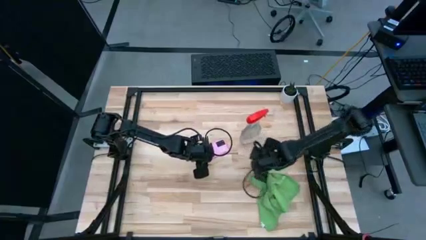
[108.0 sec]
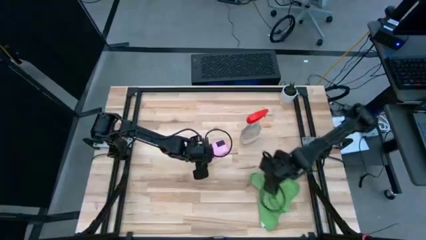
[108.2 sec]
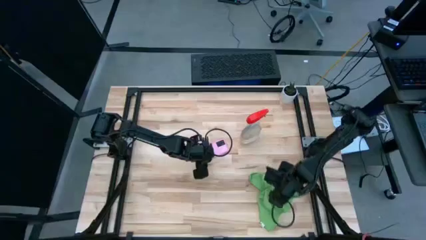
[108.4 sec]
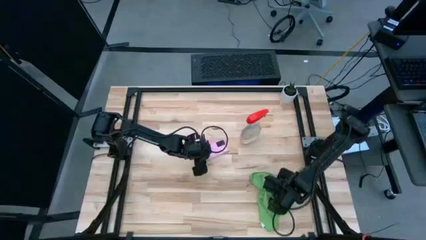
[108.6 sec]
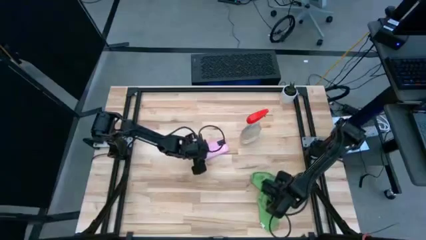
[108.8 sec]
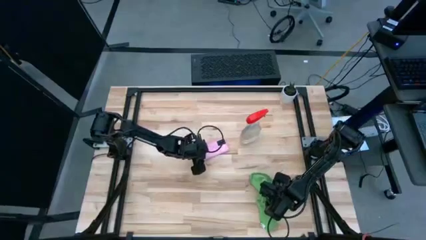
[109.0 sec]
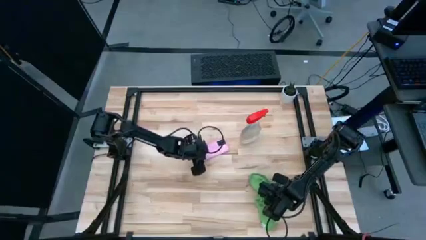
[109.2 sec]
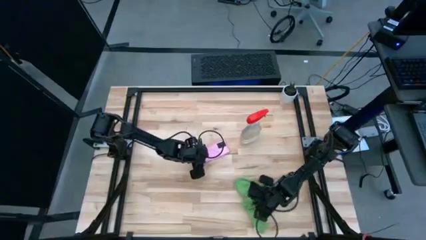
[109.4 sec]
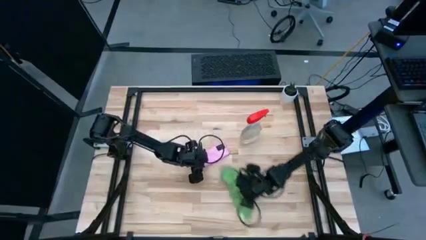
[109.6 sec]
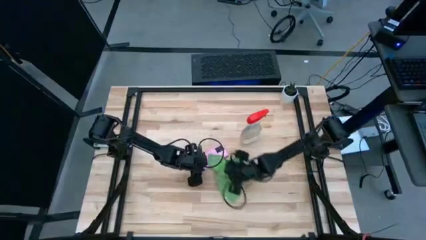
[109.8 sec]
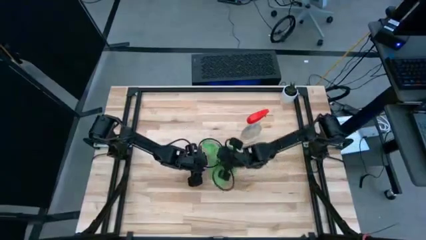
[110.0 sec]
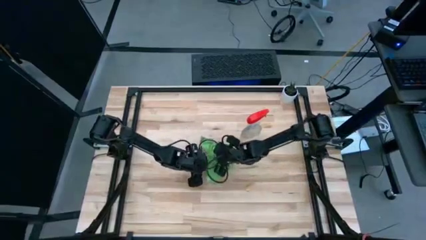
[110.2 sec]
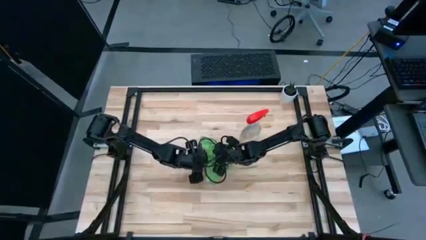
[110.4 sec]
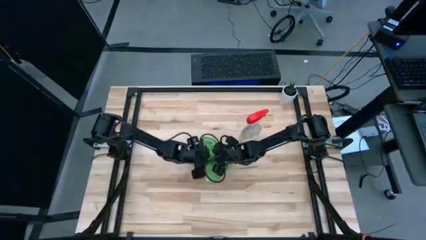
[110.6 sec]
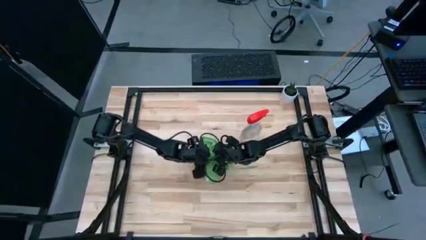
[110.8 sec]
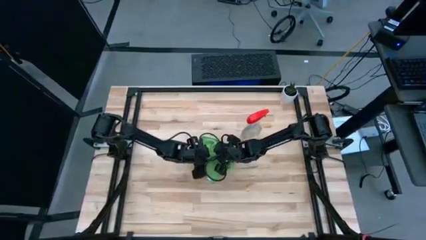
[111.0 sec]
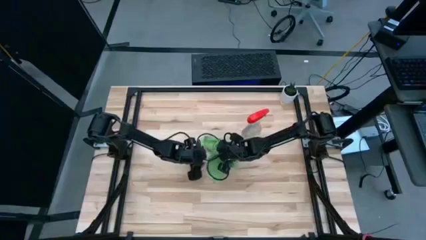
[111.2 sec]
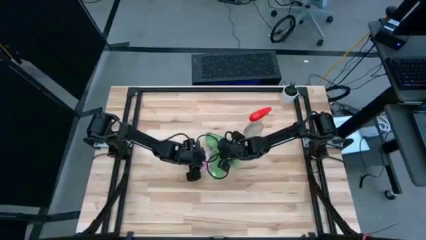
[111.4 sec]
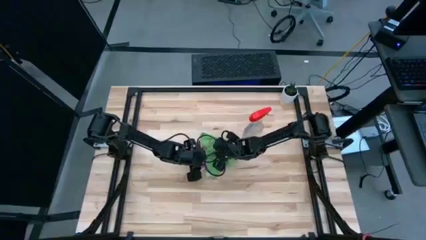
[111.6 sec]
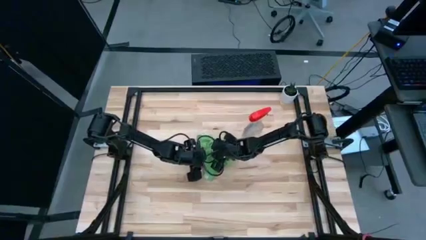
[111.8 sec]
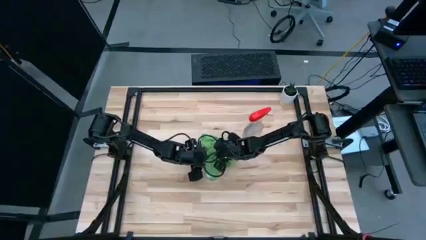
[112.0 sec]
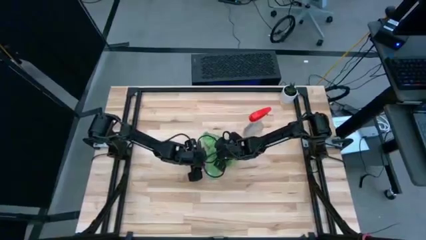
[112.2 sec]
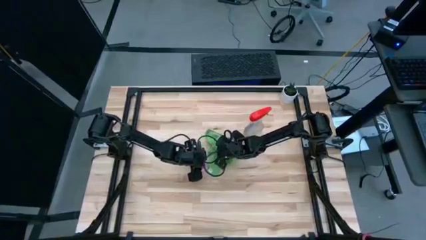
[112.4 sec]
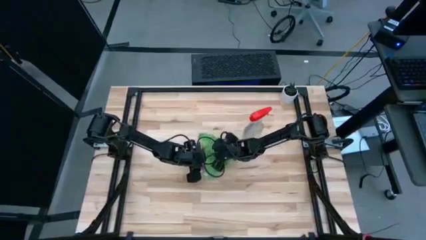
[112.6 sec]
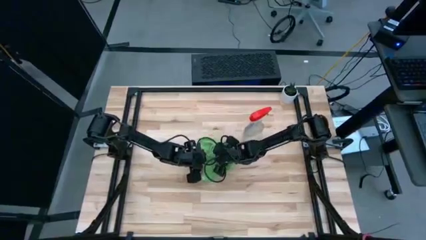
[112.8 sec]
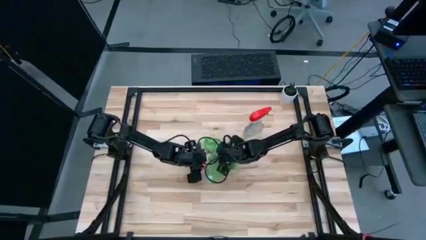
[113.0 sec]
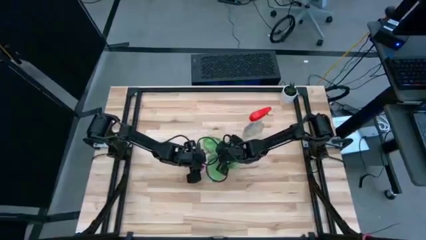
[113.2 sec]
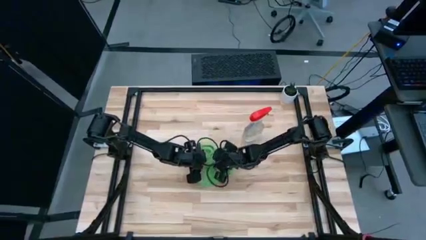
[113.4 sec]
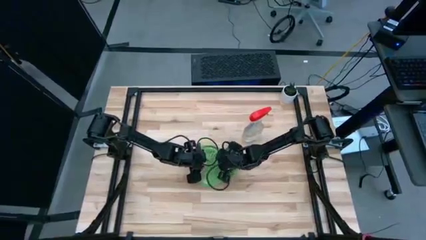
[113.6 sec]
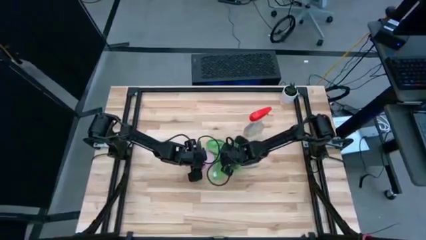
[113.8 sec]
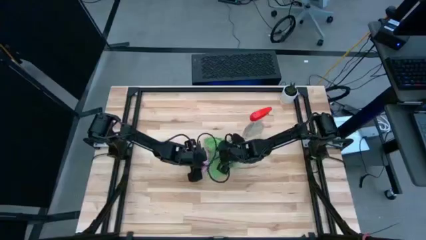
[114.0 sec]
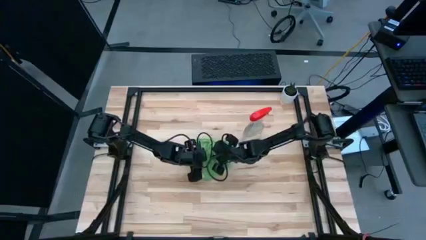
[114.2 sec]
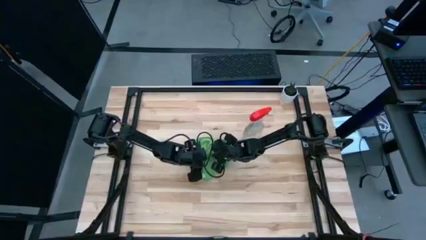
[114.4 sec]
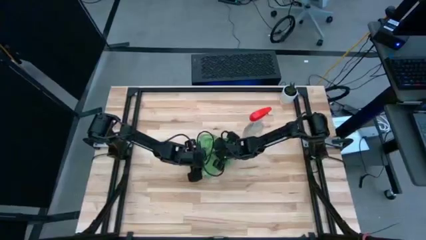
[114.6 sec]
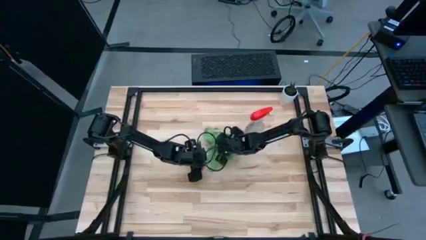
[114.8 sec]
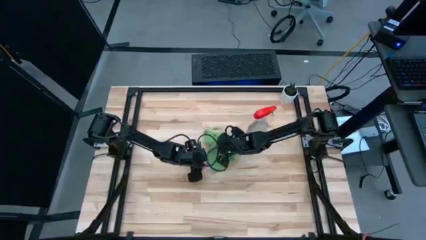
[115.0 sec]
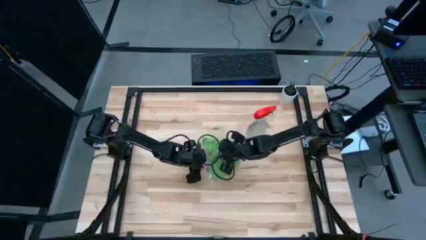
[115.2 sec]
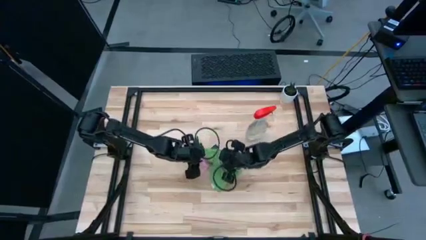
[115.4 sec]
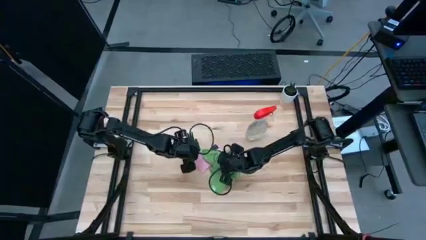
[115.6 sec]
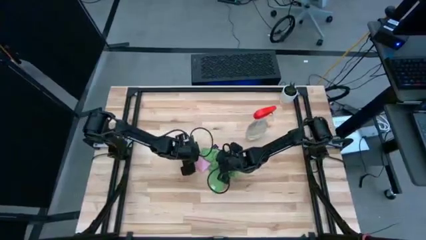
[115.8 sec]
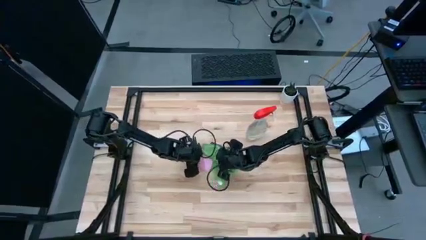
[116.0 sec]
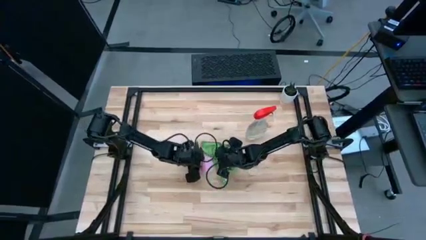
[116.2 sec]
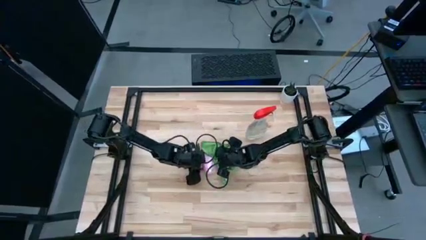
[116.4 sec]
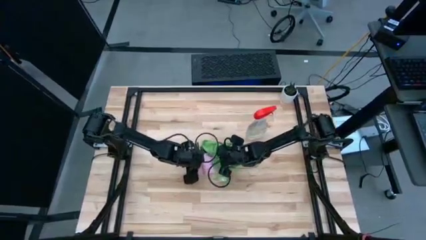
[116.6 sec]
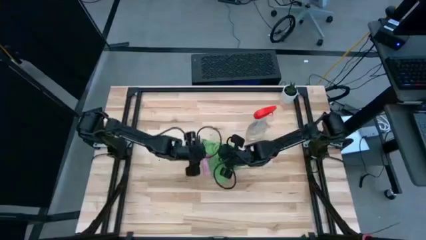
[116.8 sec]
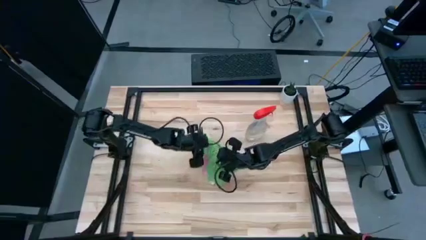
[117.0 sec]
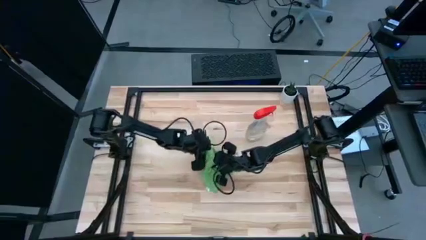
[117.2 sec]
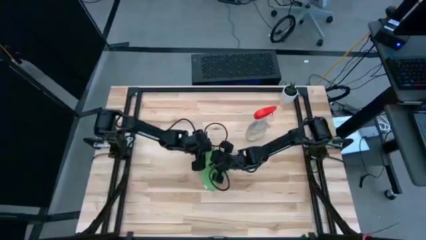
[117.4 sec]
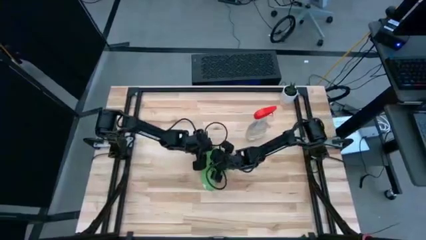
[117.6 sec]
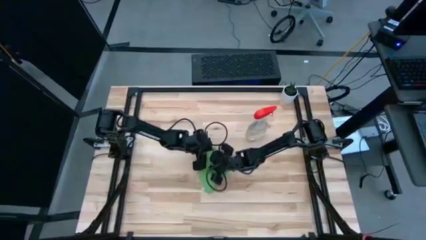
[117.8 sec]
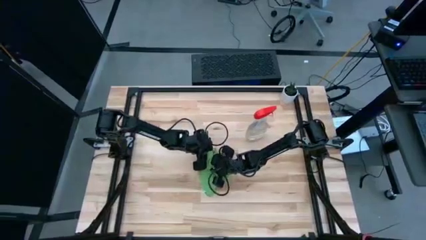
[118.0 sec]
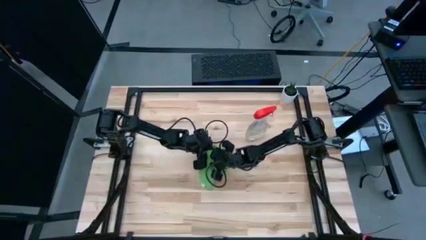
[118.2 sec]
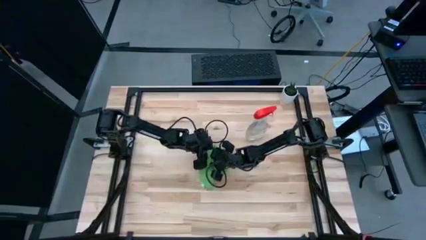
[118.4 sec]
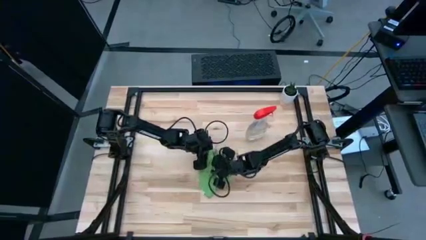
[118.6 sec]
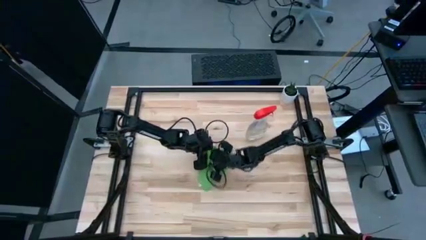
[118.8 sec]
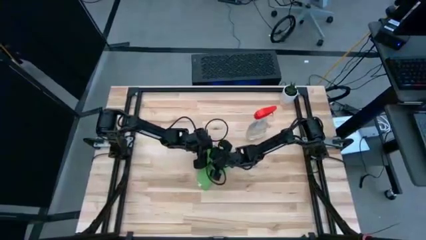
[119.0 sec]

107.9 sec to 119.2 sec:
Task: Apply microfiber cloth
Wipe the back and front of the cellphone with the green microfiber cloth

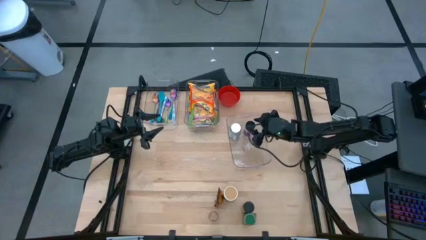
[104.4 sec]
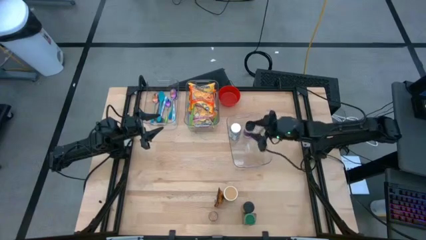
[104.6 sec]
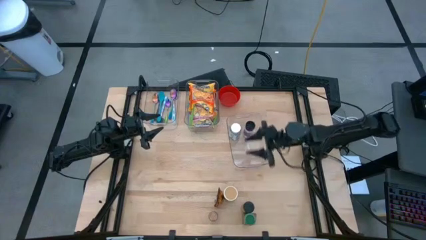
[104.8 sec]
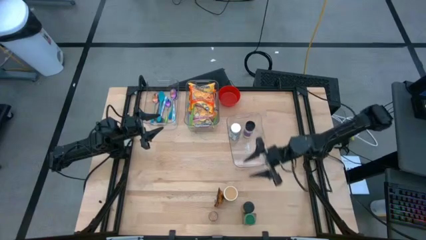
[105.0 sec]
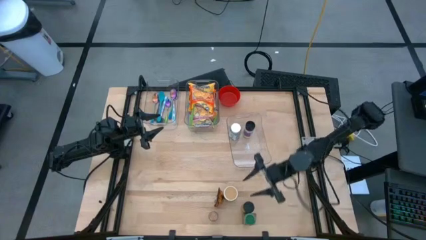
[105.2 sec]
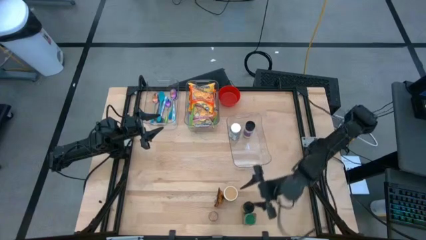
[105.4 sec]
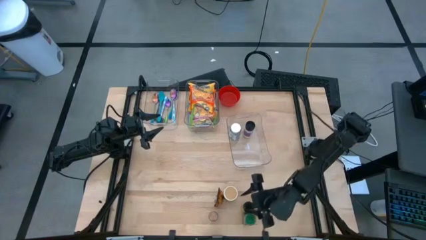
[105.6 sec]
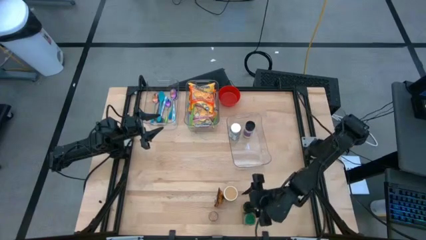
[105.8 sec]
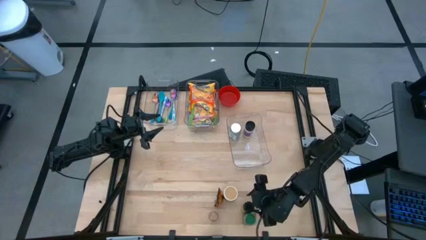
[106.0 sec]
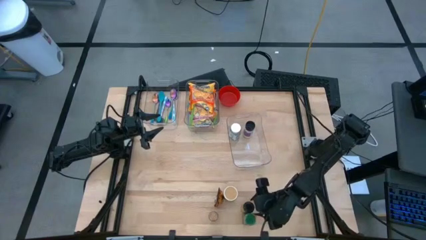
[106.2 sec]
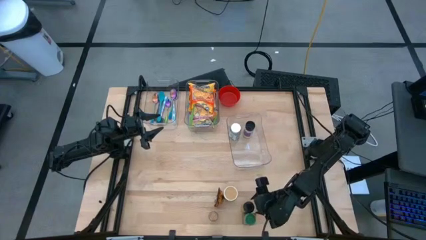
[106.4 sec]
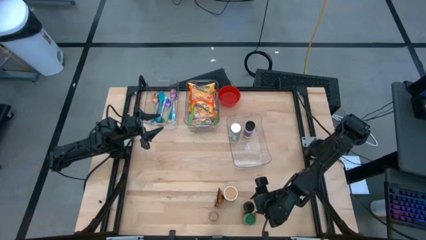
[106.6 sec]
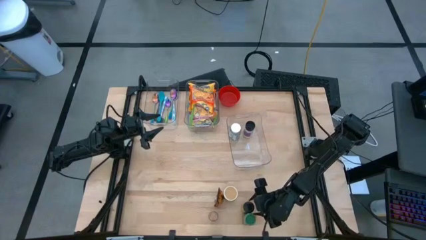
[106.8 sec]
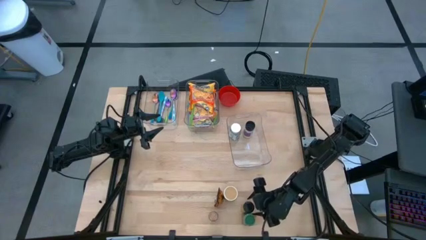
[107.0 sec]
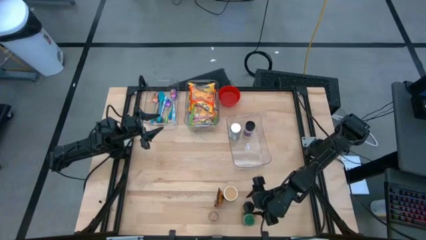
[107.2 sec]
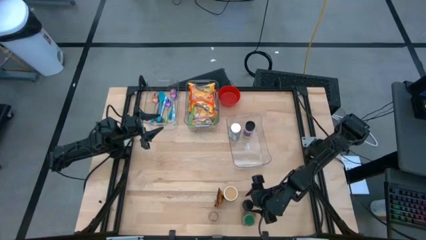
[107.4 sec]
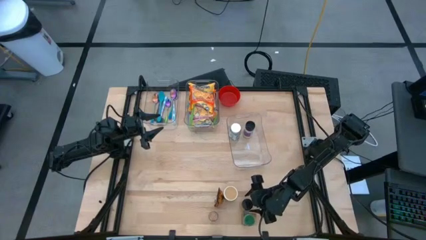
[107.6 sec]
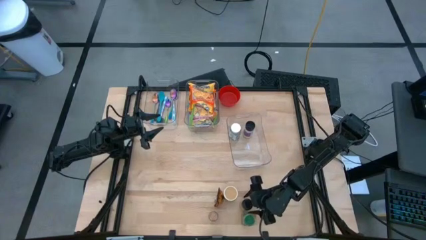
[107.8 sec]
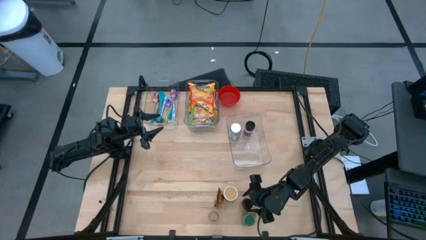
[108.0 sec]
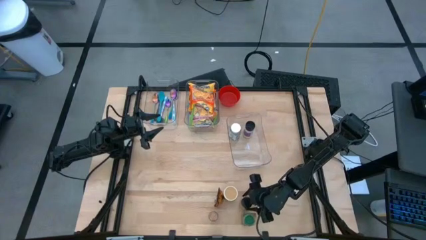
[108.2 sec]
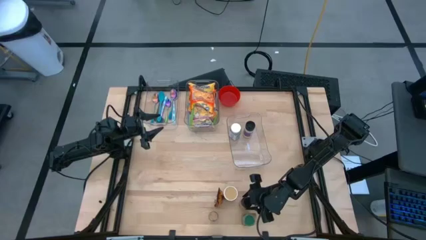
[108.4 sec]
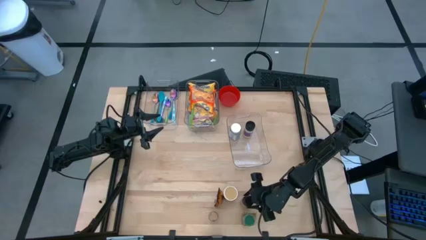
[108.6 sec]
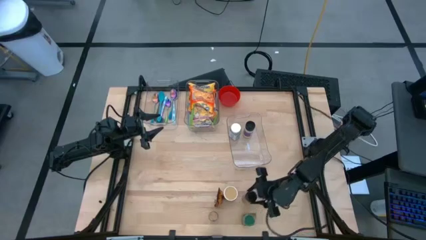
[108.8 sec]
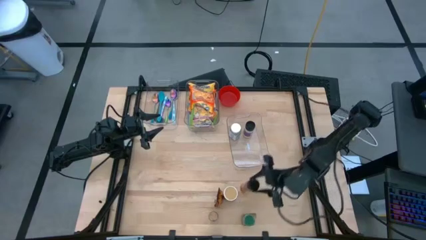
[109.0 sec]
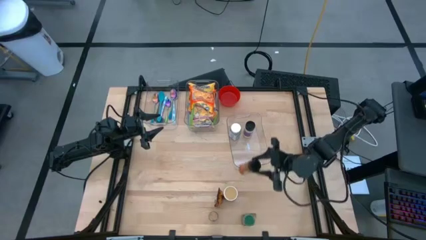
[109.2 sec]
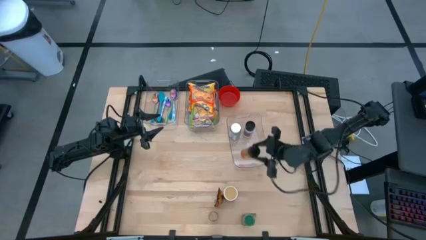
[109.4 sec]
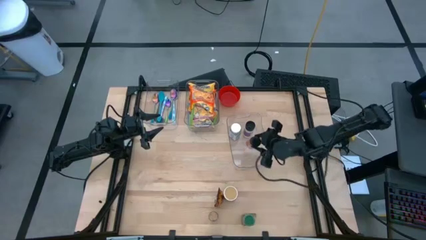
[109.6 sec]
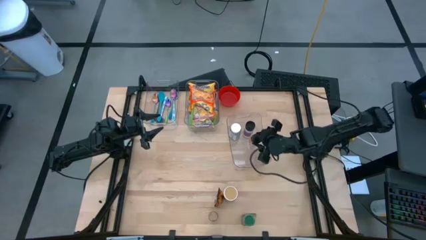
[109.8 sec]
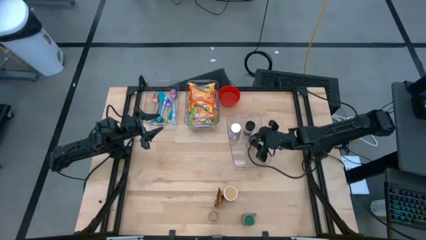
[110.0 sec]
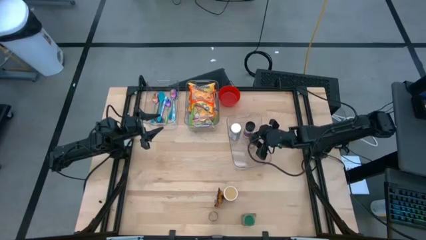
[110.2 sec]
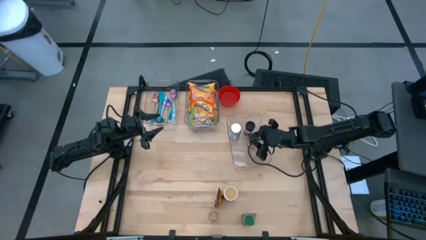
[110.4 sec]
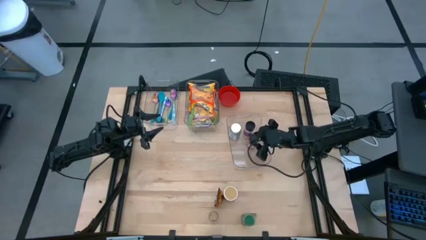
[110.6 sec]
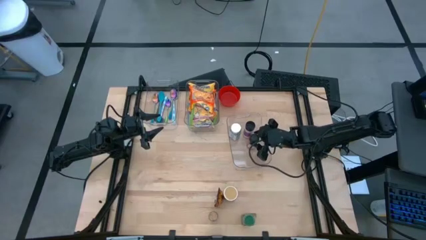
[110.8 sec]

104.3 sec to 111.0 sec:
Task: Pick & Place Food Item
Put the black and orange seasoning bottle into the bottom right transparent bin
